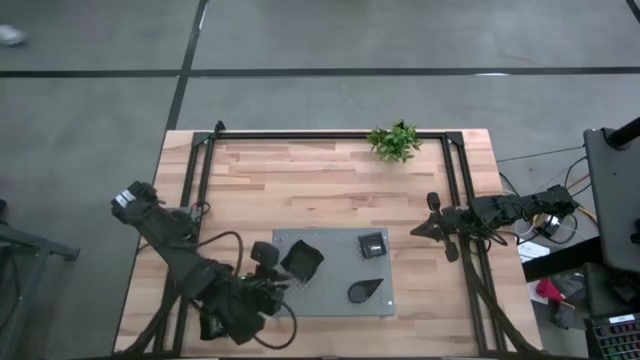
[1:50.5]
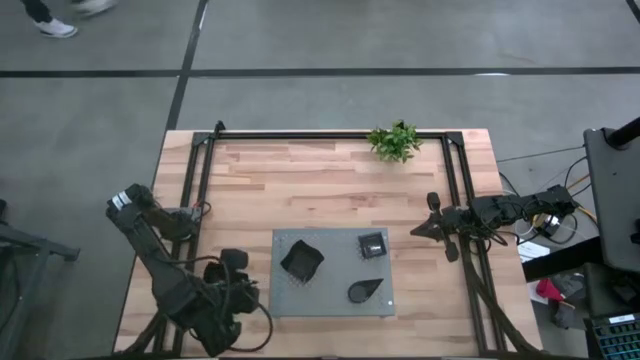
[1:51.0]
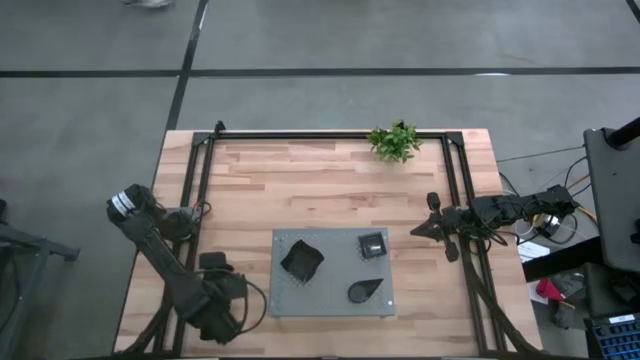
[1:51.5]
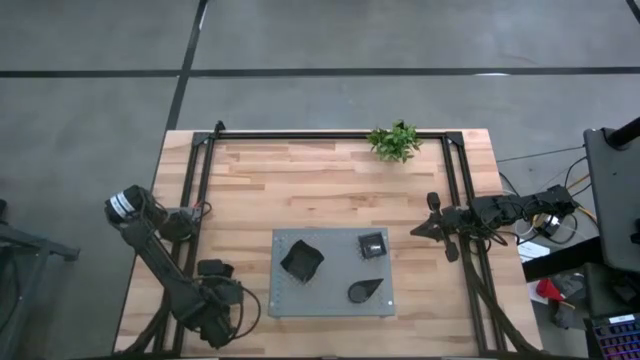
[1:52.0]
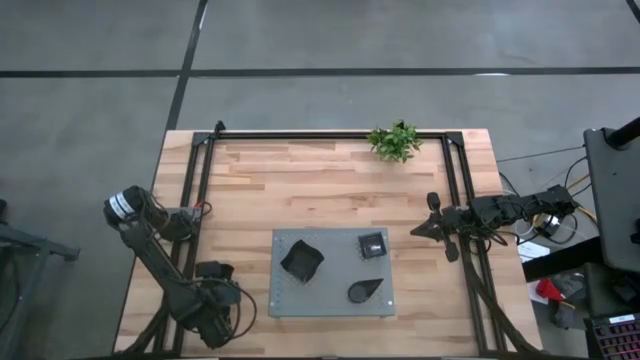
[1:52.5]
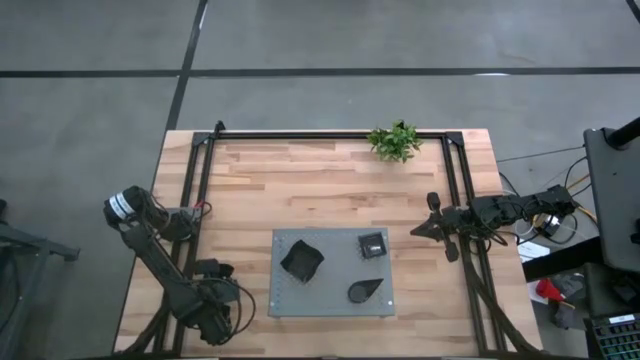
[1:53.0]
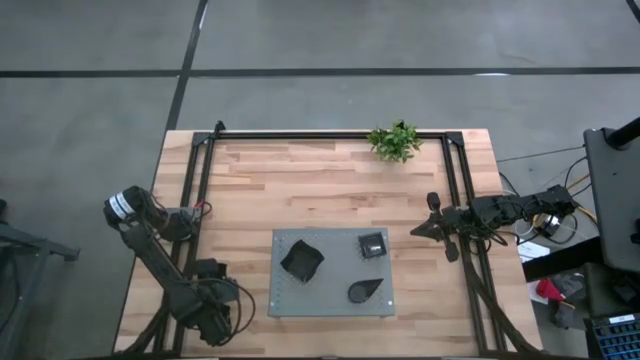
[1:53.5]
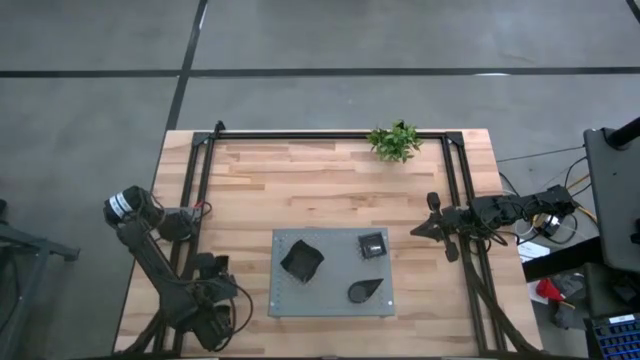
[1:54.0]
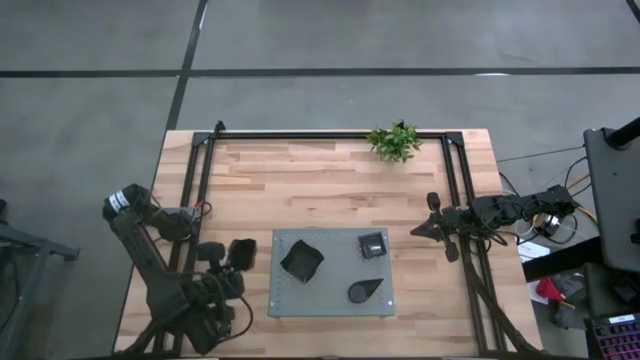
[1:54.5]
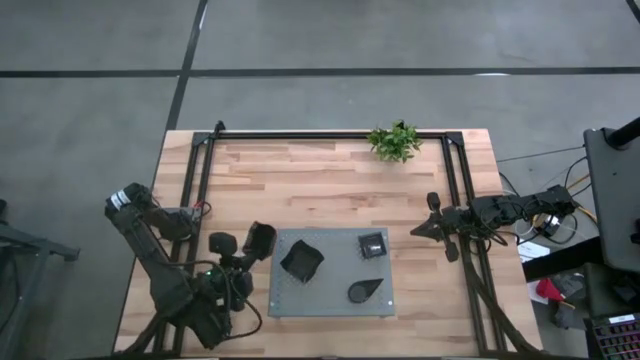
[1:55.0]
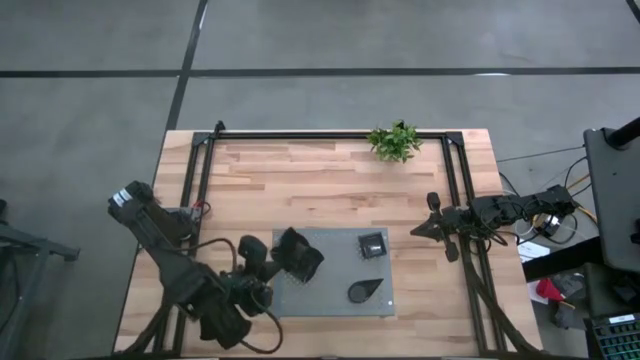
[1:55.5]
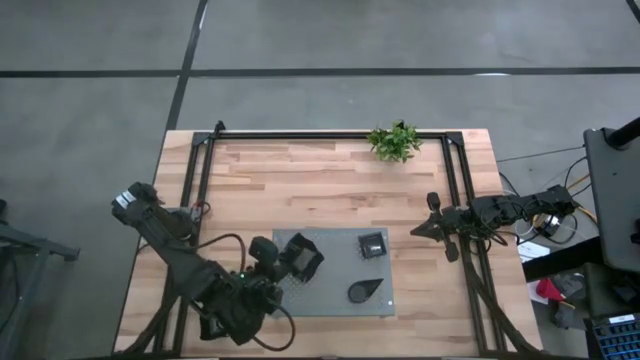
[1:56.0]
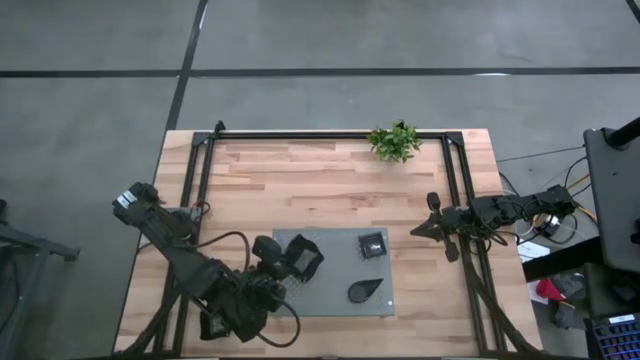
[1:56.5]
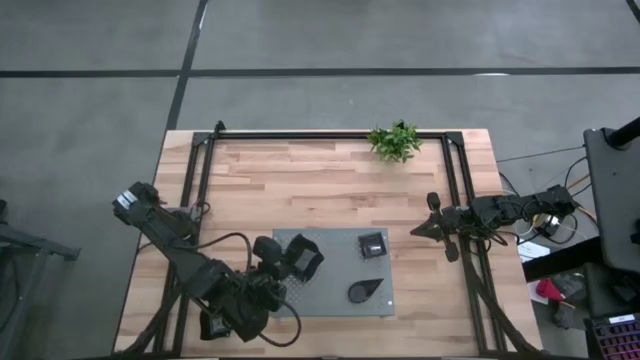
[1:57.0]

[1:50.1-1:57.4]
Task: Pick & Place Mini shaped plates
Stack the distorted square plate on top of the distorted square plate on the shelf

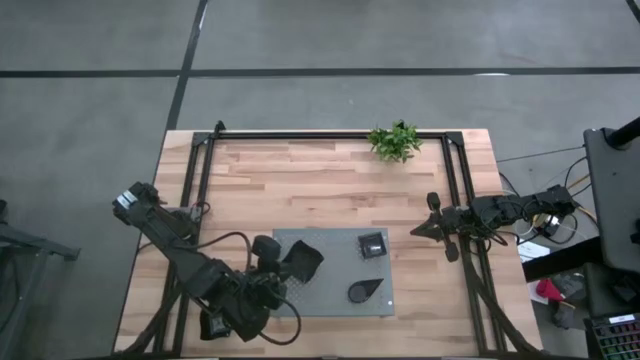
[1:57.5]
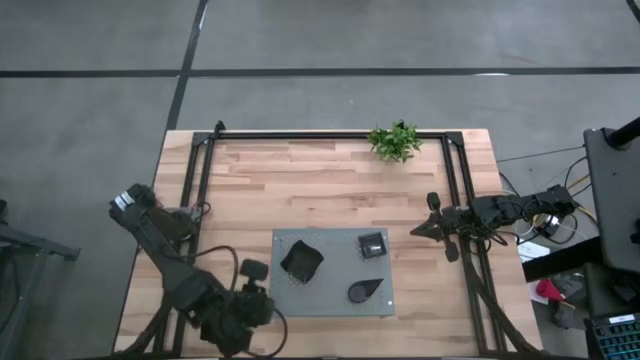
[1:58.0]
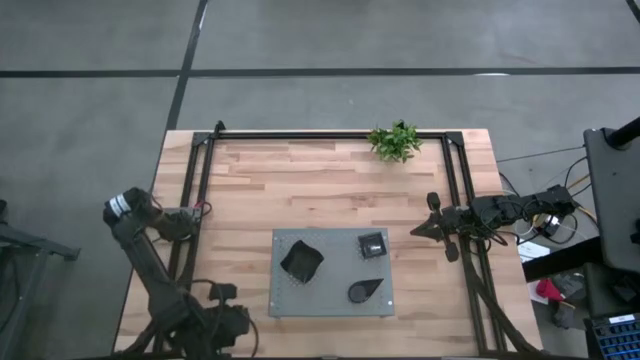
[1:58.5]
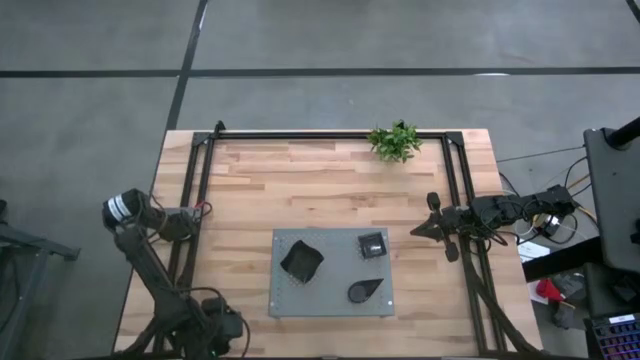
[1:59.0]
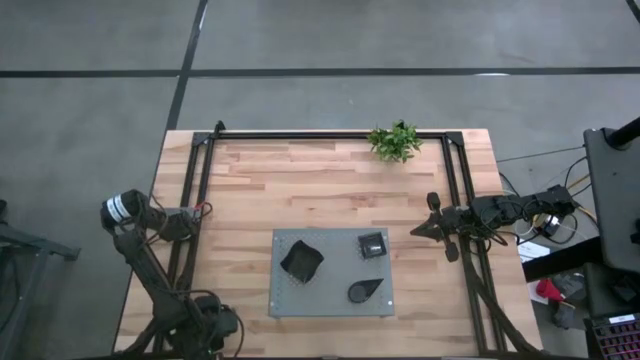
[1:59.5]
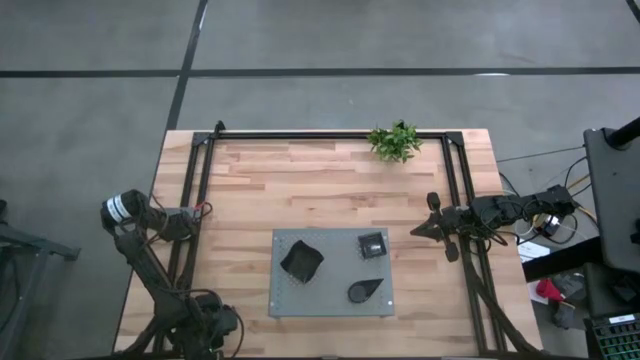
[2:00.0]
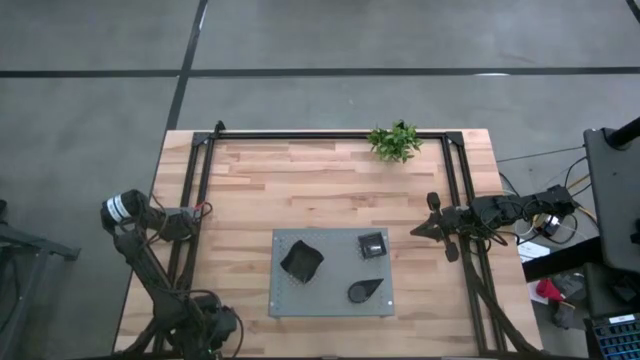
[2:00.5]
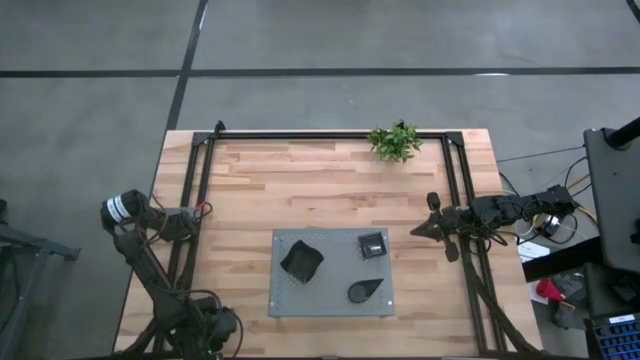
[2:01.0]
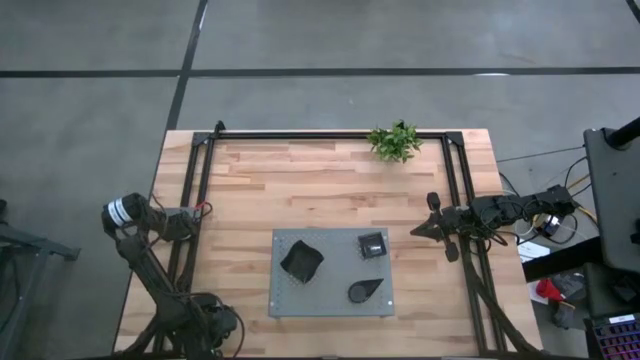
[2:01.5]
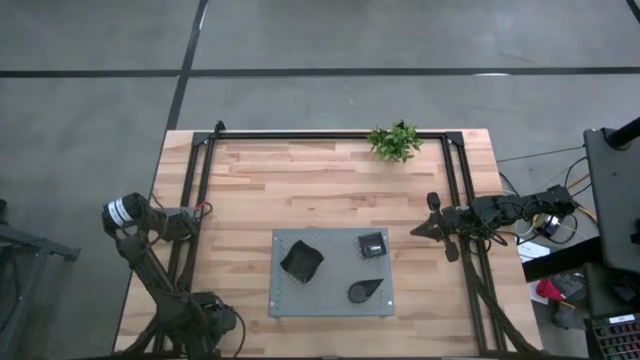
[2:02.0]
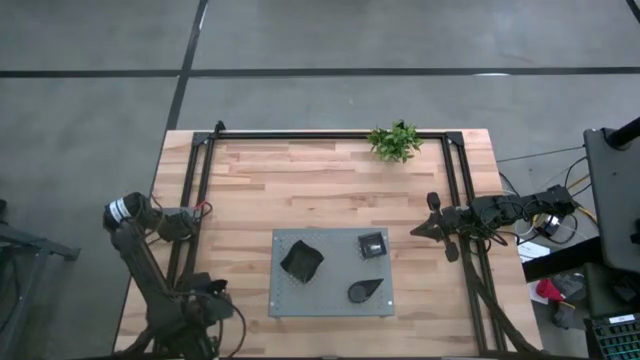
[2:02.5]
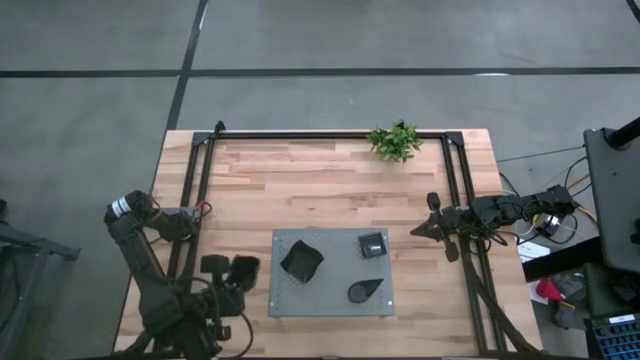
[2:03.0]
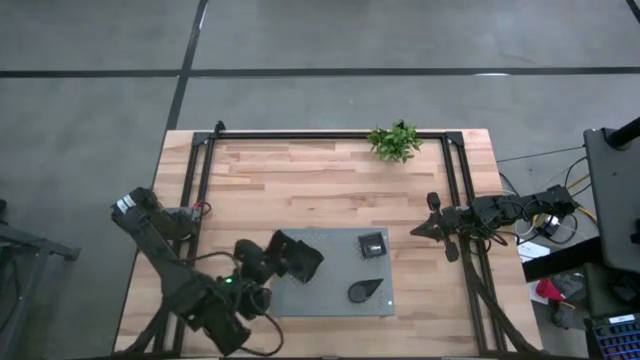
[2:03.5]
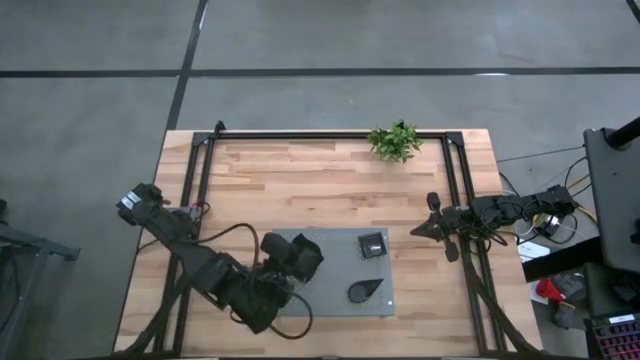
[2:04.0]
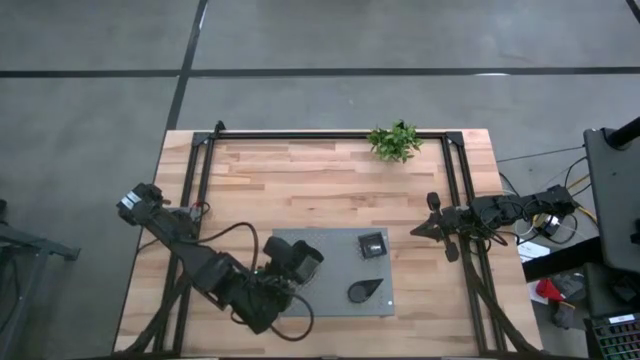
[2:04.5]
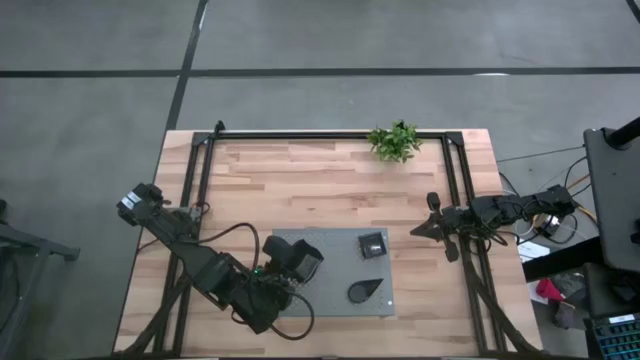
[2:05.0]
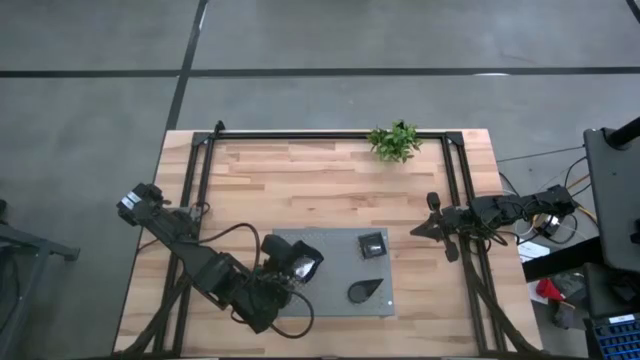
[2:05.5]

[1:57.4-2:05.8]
Stack the distorted square plate on top of the distorted square plate on the shelf

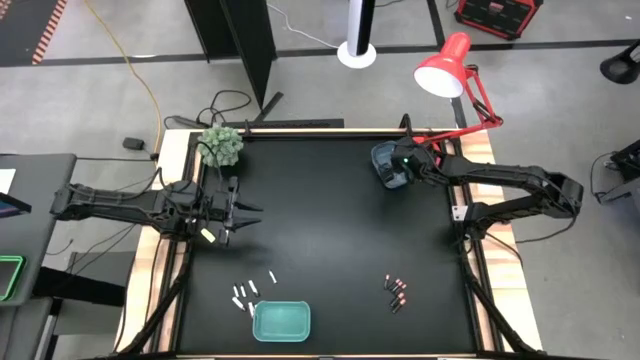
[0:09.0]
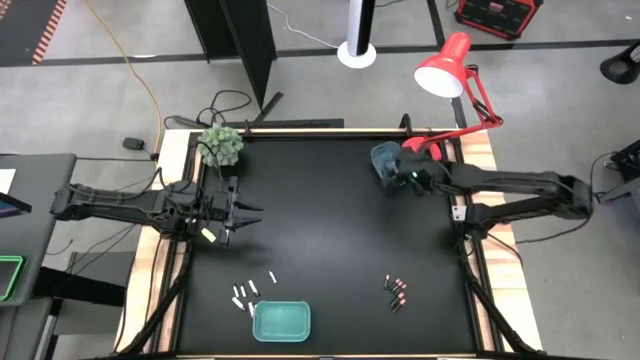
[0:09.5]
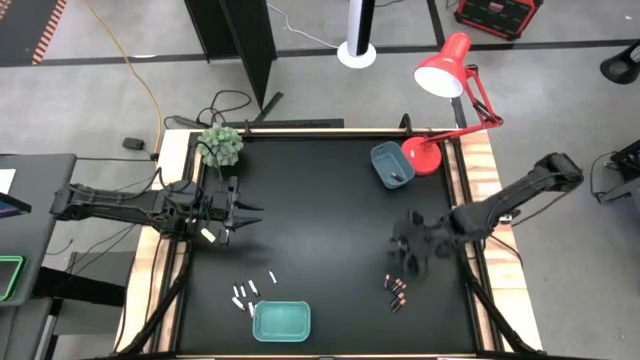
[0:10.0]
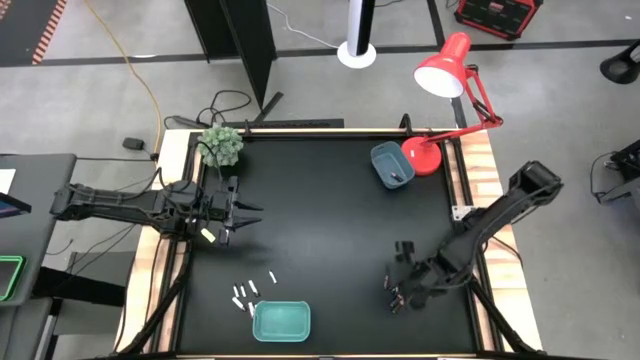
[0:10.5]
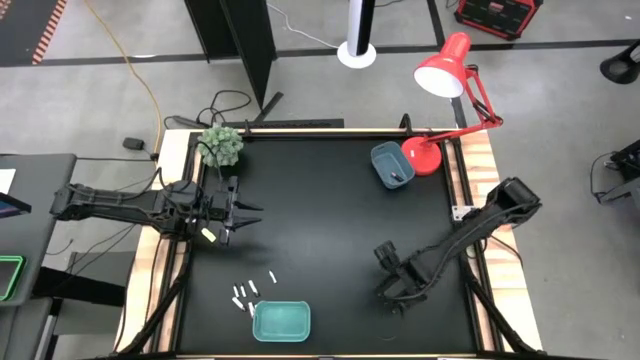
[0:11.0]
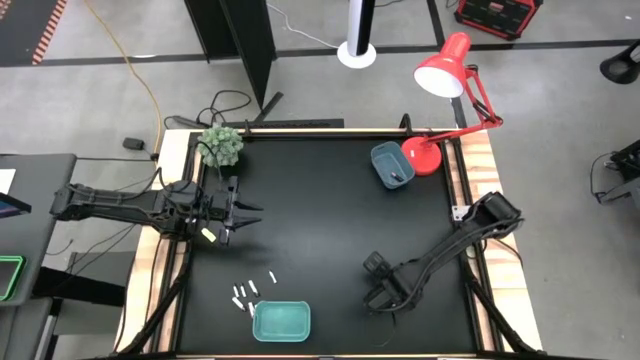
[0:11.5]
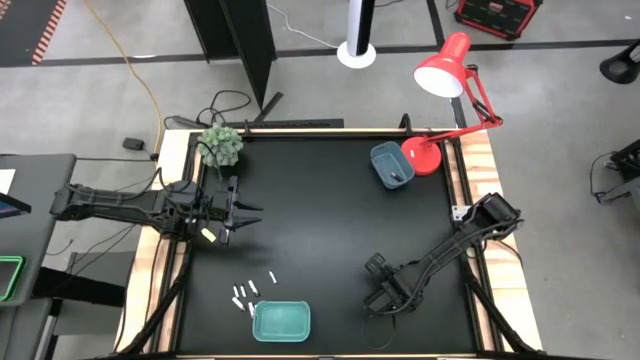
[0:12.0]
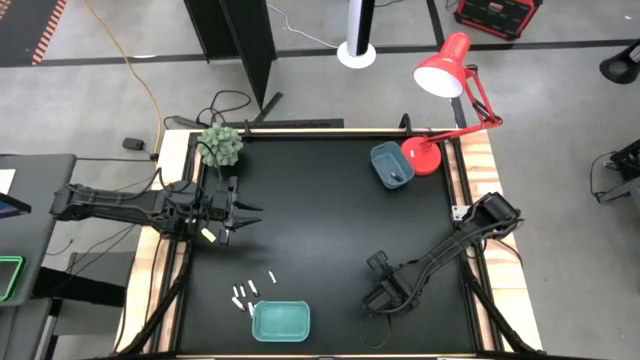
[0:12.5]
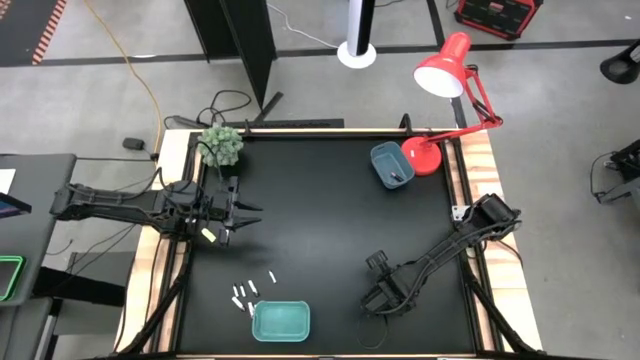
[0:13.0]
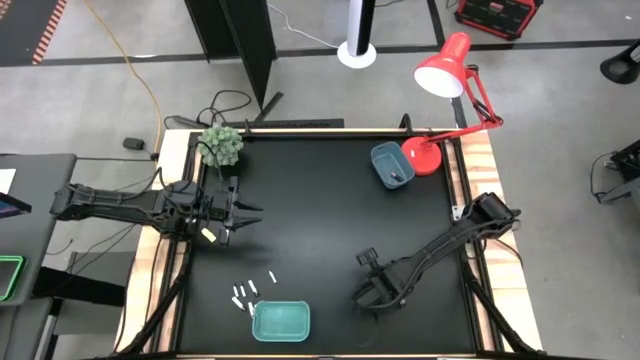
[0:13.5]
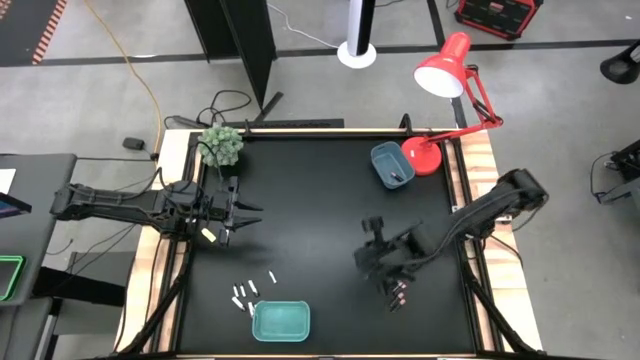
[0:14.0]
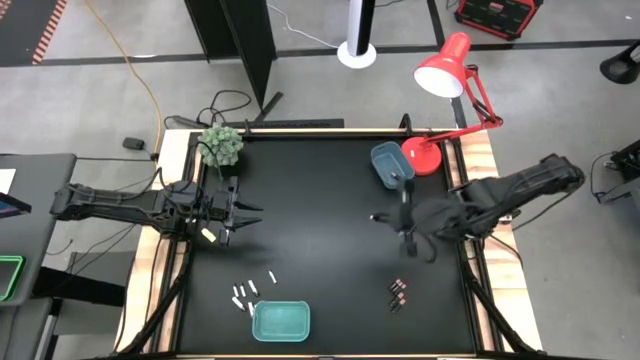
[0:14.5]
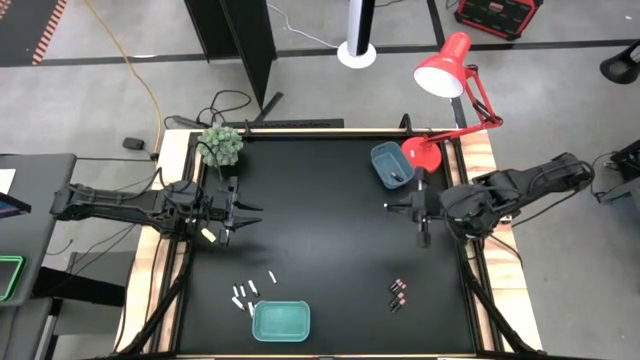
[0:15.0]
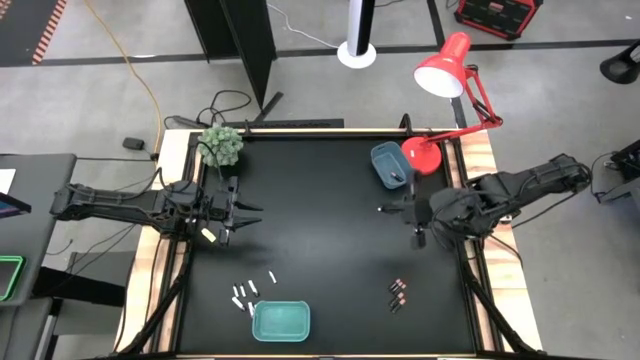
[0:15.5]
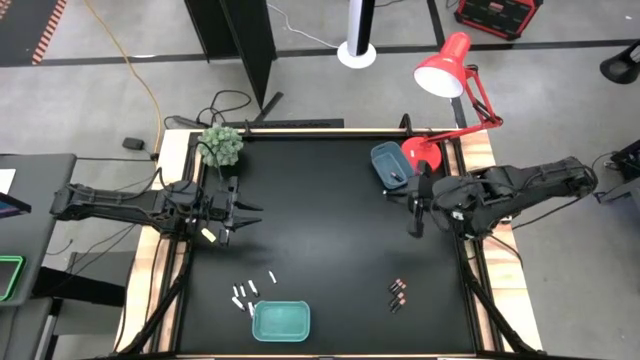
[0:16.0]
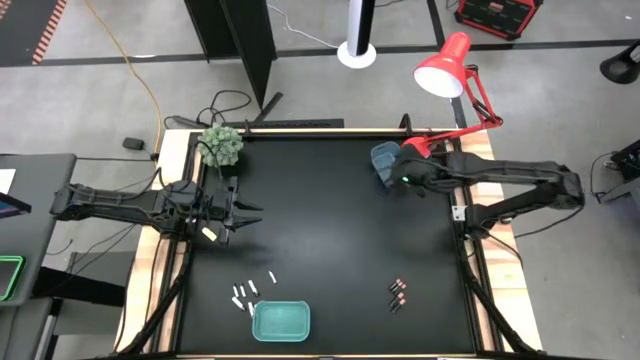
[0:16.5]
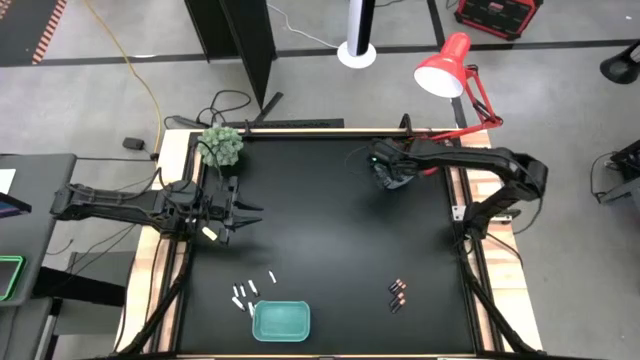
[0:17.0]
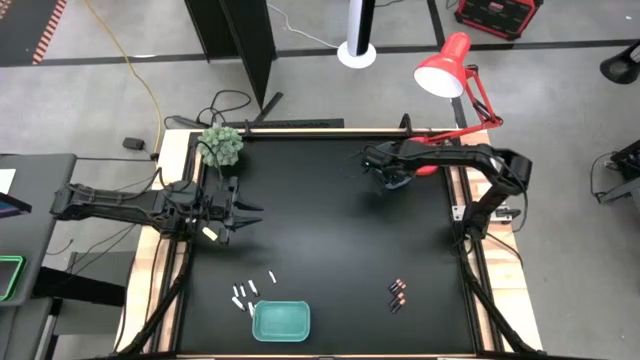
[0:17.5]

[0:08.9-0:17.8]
Task: Sort batteries
Put the black battery into the blue bin
